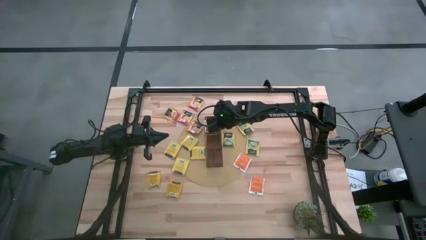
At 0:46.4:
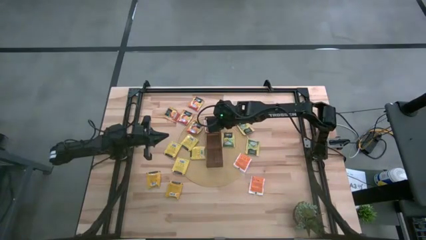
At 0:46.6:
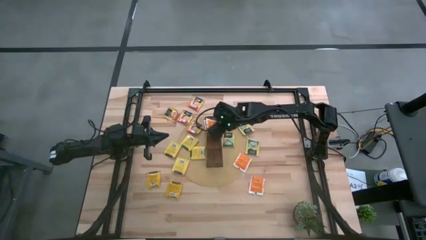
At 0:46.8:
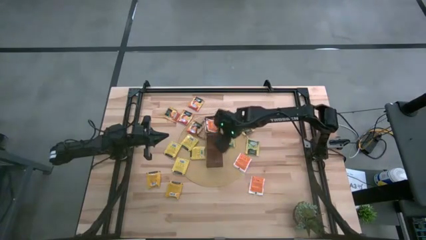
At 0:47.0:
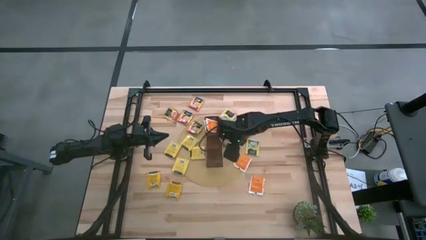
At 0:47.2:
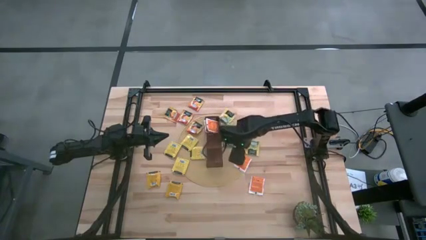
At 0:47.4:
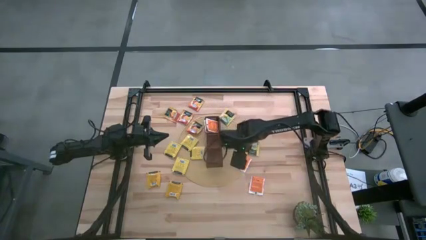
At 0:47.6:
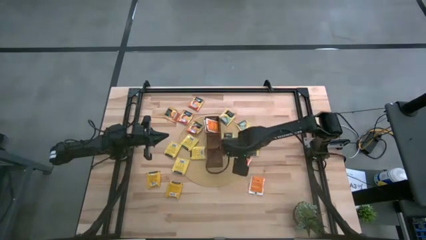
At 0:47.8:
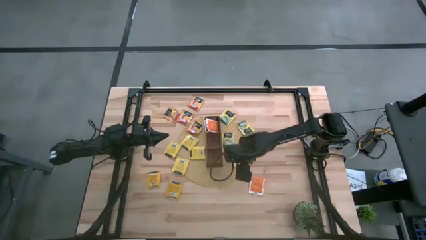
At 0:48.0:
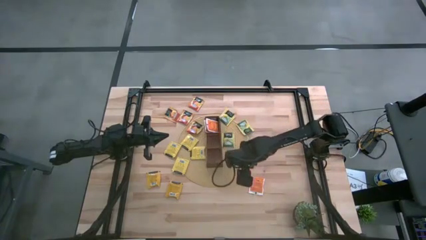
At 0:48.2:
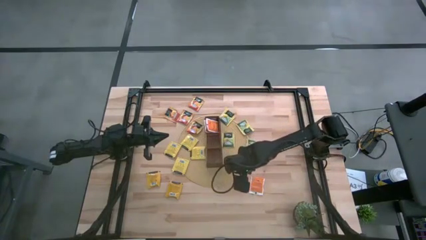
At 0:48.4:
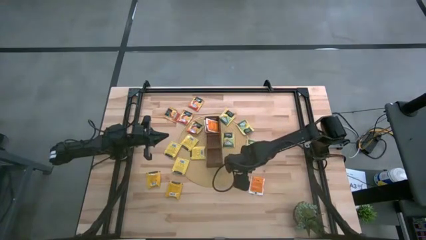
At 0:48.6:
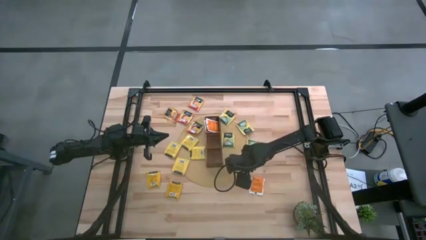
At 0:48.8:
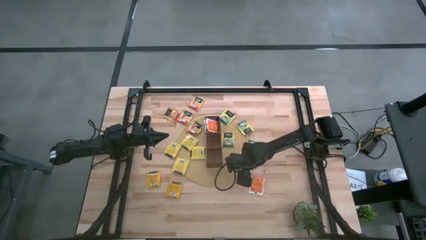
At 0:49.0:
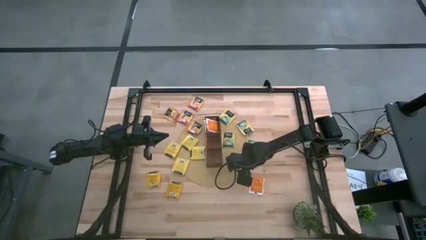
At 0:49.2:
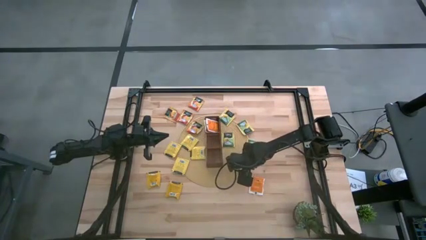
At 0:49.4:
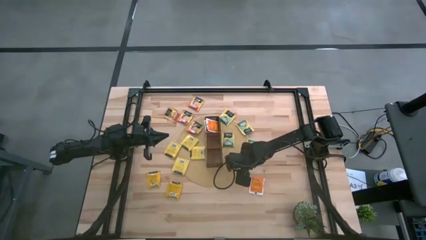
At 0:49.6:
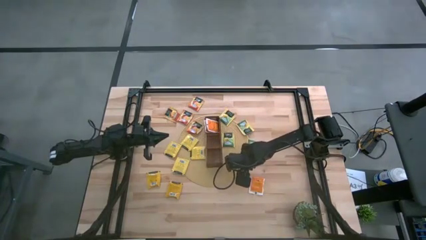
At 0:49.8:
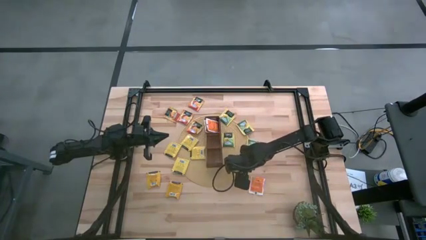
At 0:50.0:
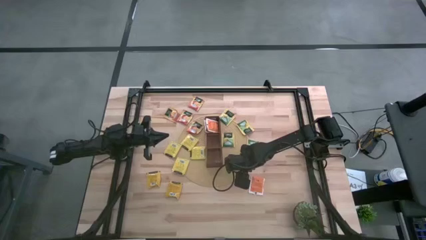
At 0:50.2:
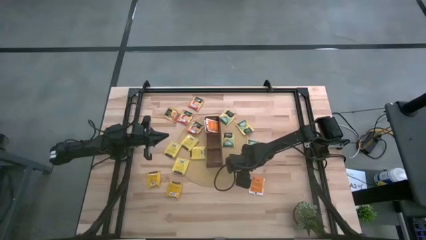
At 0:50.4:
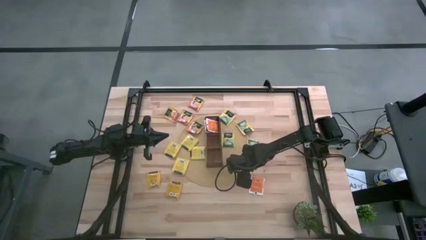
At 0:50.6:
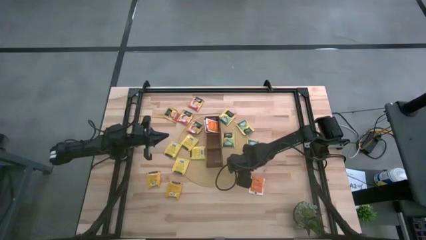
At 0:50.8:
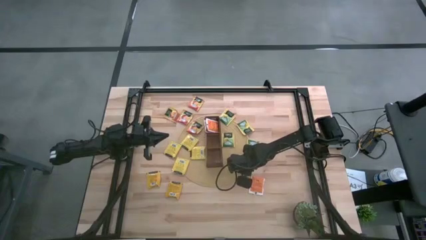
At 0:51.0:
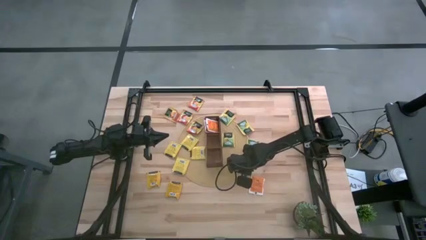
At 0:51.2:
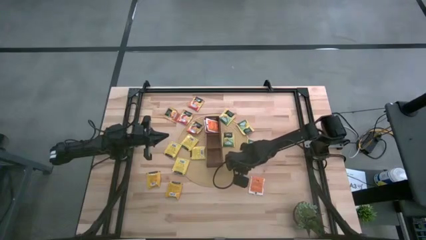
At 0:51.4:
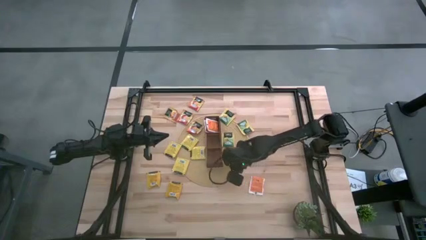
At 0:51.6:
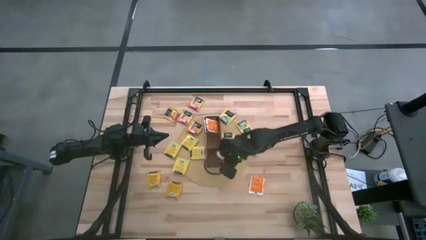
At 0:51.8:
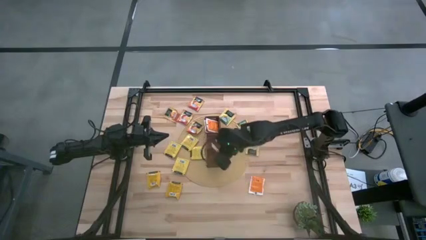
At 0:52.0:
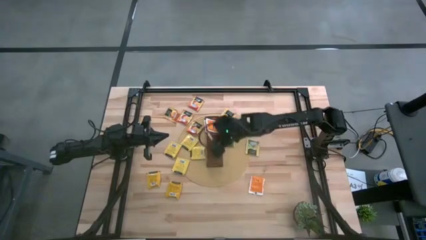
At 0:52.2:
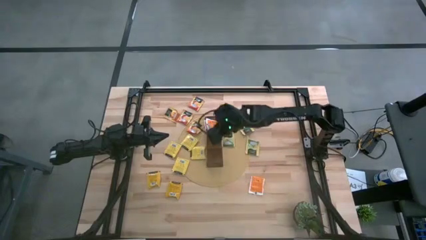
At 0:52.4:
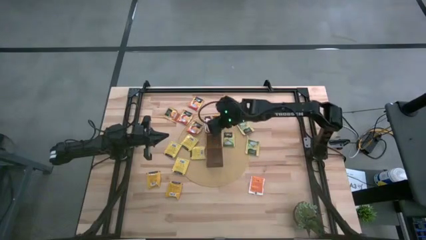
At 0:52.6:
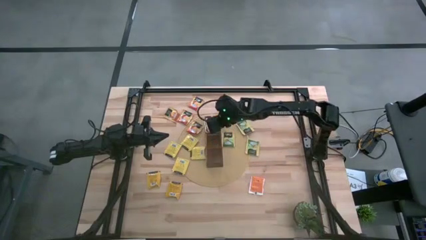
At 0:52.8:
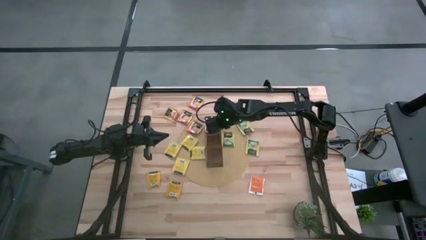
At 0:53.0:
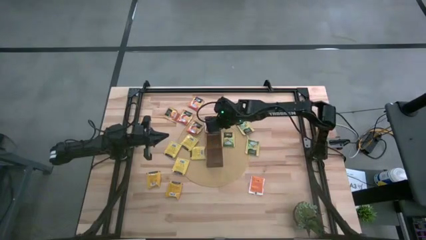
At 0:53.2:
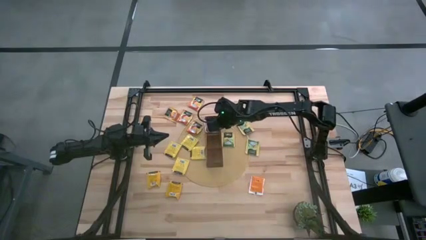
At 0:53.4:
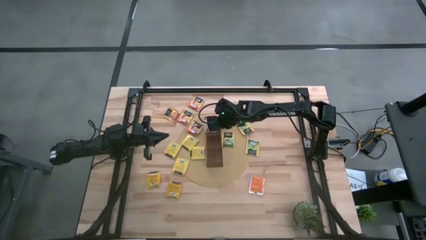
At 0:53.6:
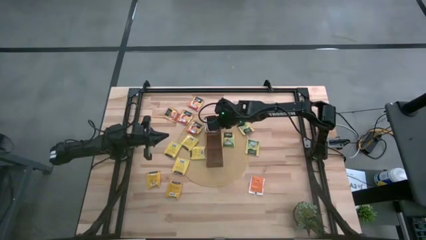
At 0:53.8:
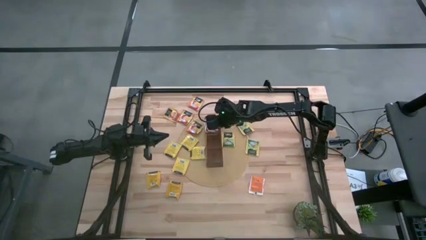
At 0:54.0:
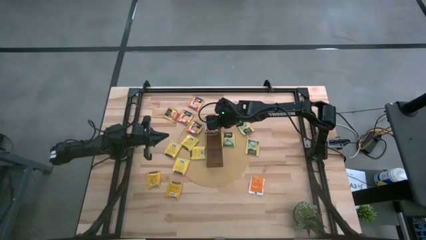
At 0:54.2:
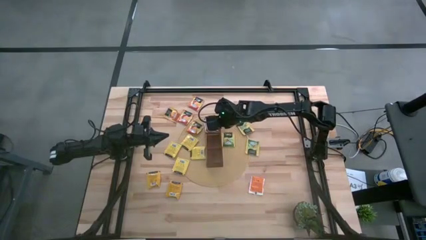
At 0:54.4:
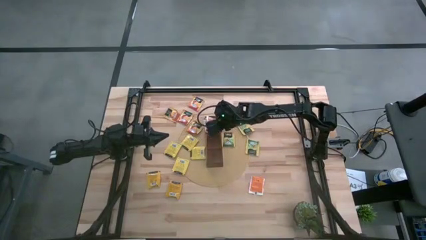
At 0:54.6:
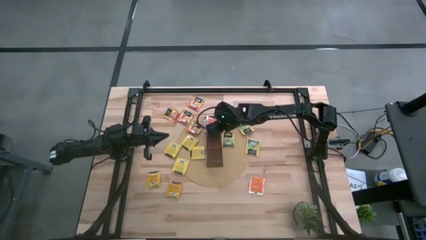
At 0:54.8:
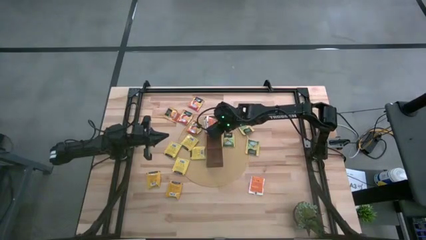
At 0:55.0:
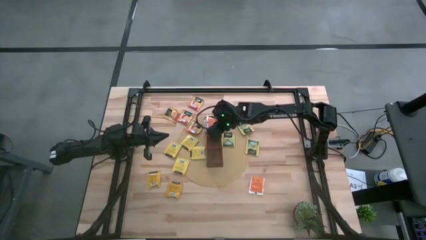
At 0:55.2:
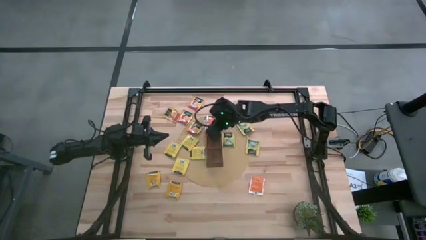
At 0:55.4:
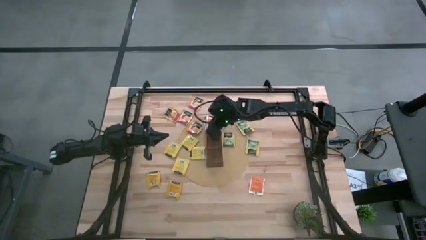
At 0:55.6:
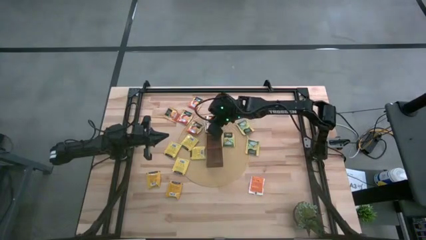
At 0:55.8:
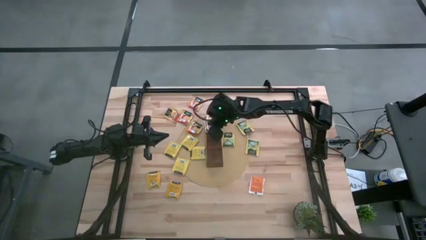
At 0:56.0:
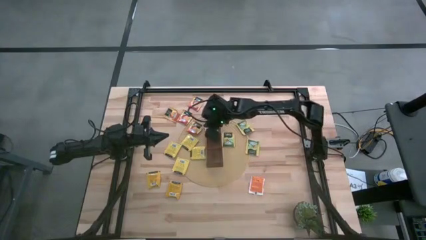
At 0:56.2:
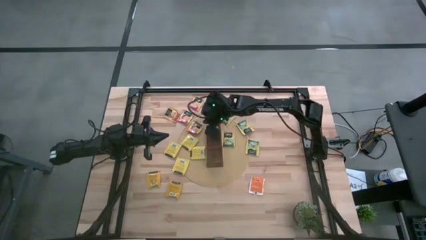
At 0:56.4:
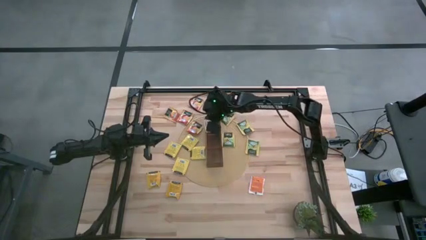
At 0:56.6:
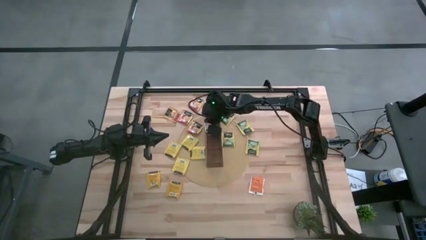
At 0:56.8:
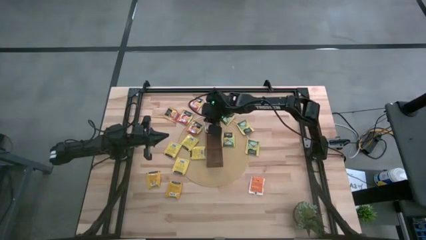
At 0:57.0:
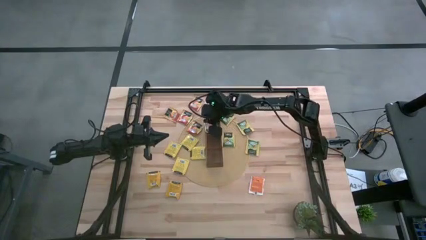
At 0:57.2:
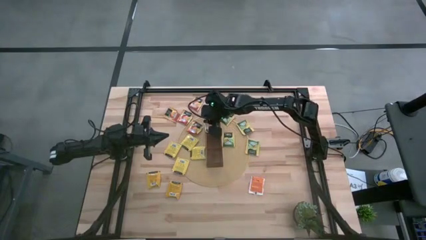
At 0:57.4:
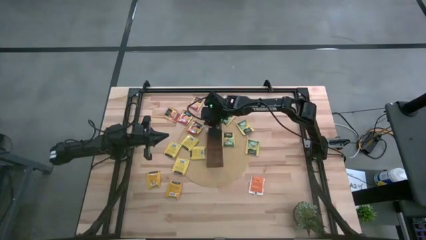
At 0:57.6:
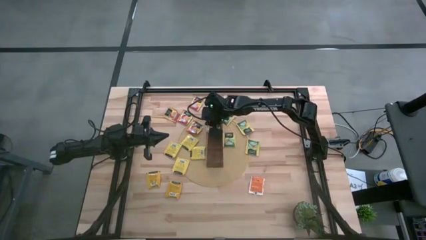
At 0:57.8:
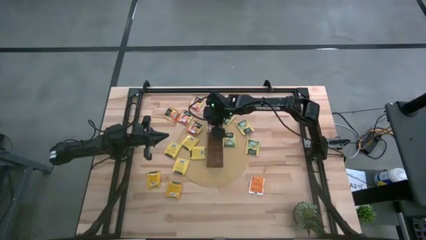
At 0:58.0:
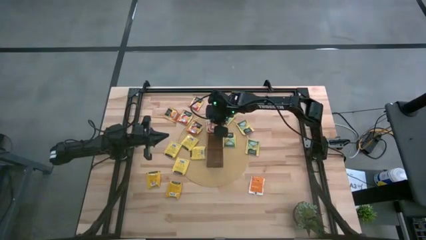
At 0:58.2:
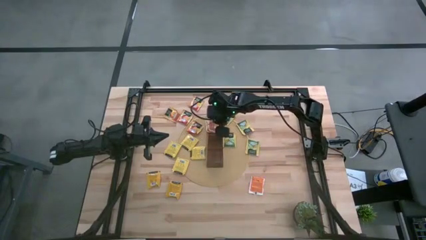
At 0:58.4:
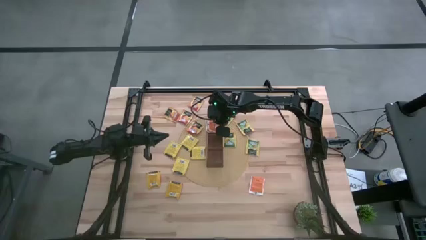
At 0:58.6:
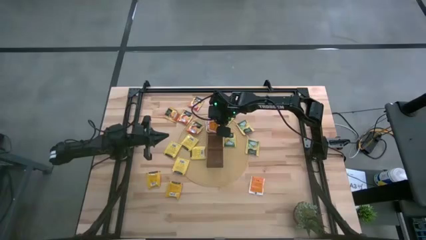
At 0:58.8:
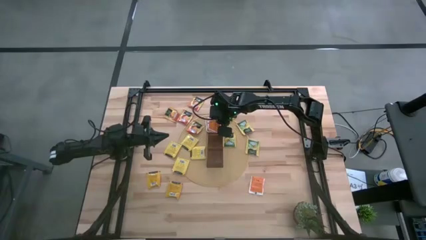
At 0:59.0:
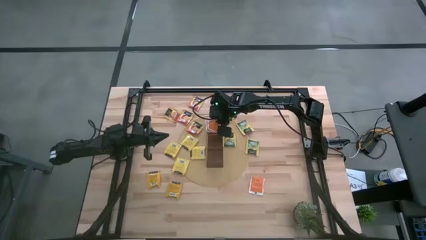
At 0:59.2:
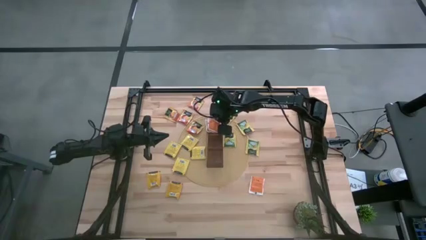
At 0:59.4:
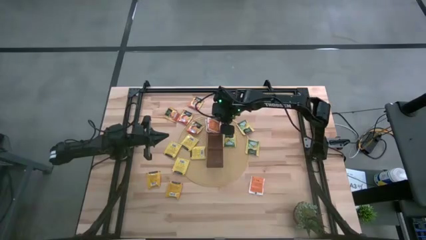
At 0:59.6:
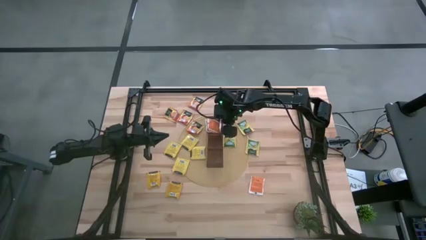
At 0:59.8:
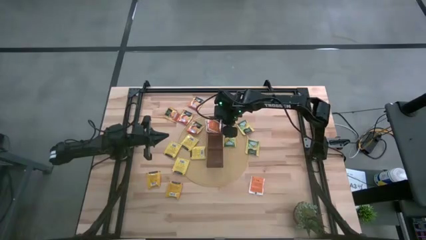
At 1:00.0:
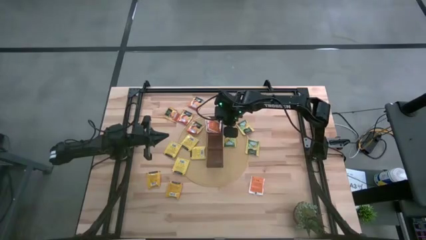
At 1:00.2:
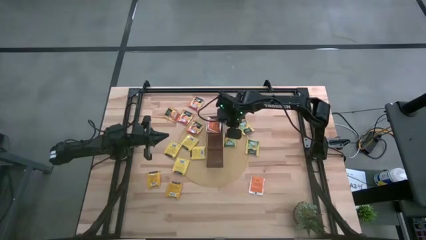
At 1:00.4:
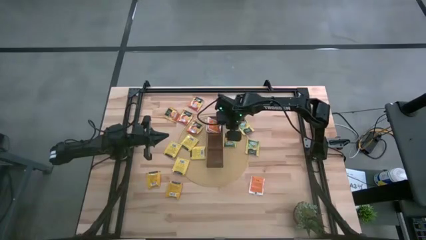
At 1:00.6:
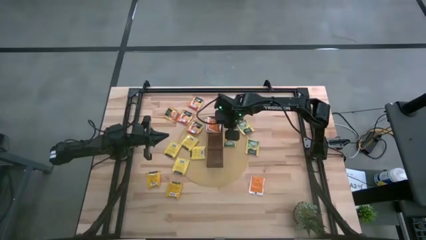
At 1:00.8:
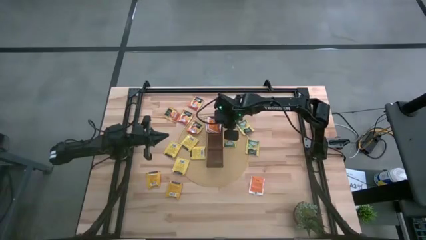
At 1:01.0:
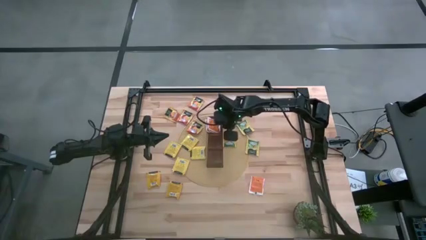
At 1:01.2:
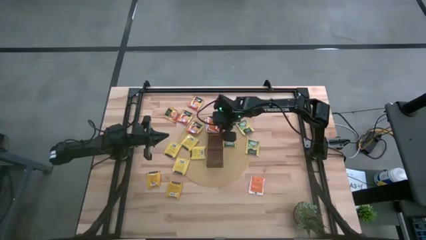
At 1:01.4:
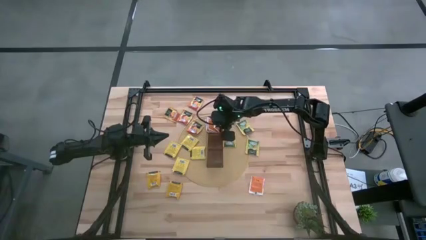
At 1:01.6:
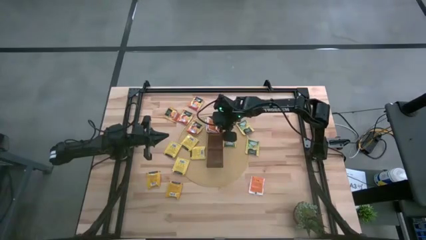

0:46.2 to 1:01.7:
Task: Pick & Place Tea
Put the top white tea bag into the top section of the wooden organizer
